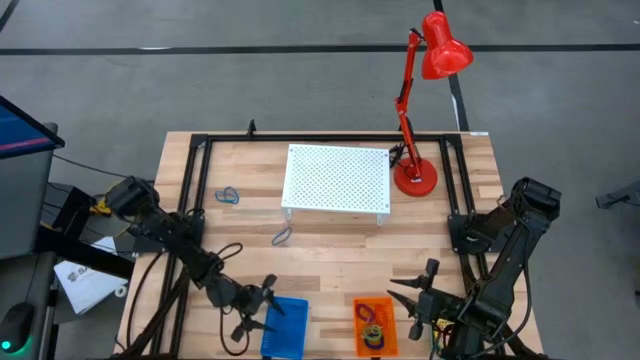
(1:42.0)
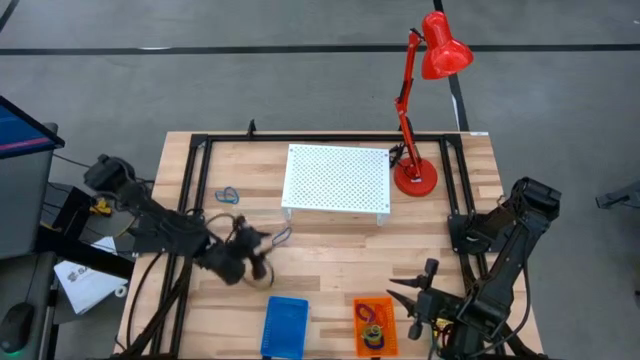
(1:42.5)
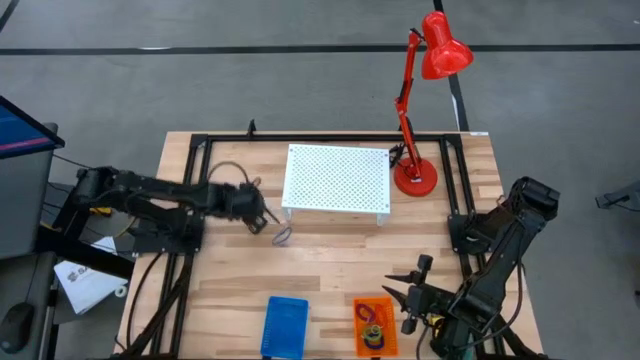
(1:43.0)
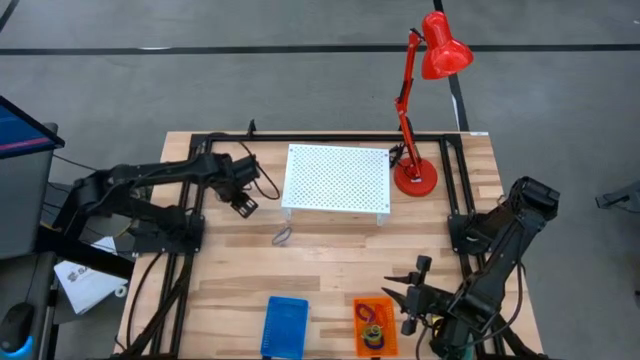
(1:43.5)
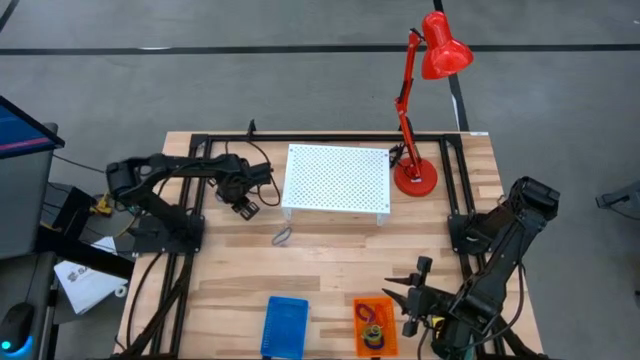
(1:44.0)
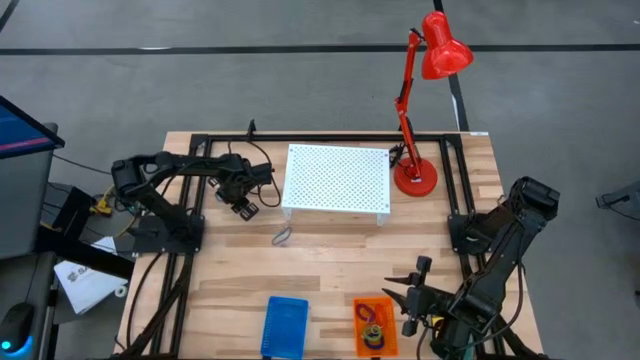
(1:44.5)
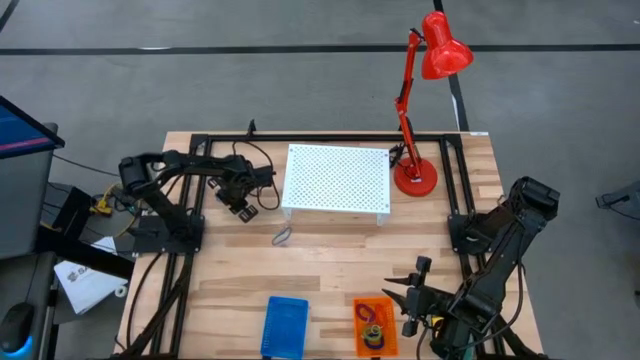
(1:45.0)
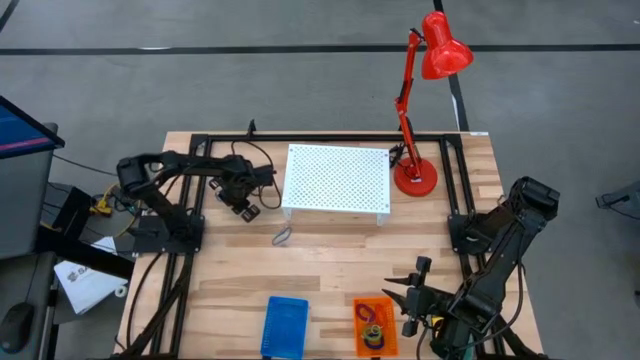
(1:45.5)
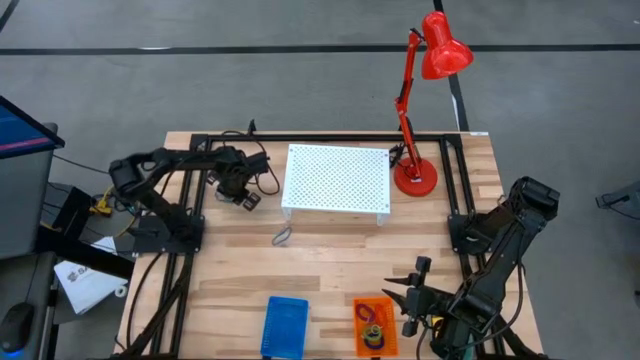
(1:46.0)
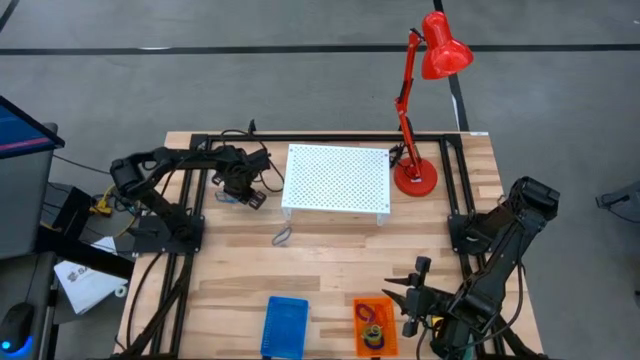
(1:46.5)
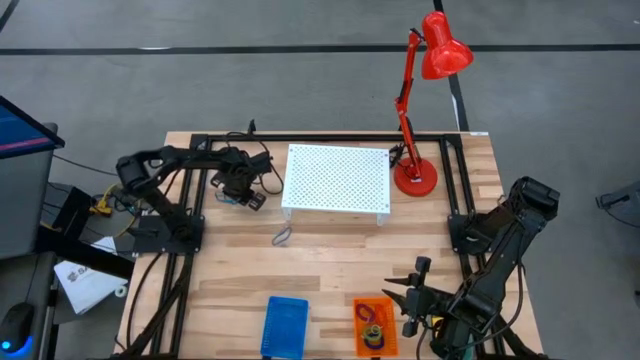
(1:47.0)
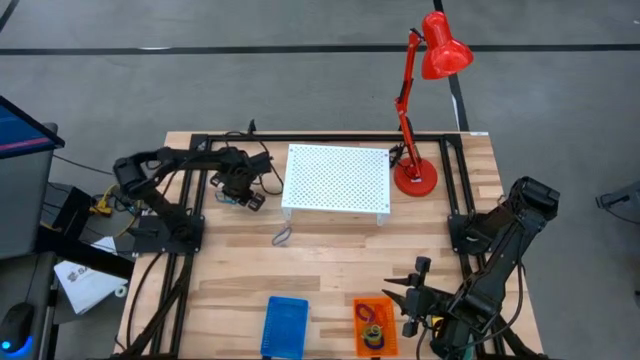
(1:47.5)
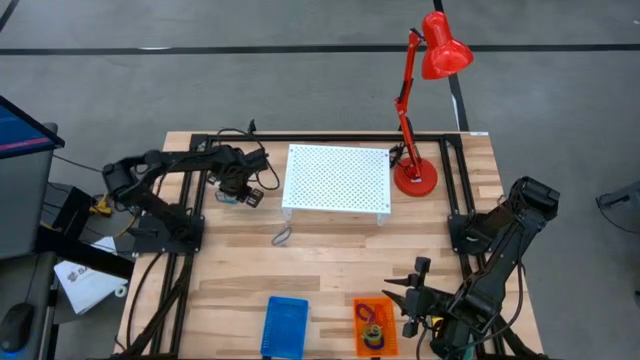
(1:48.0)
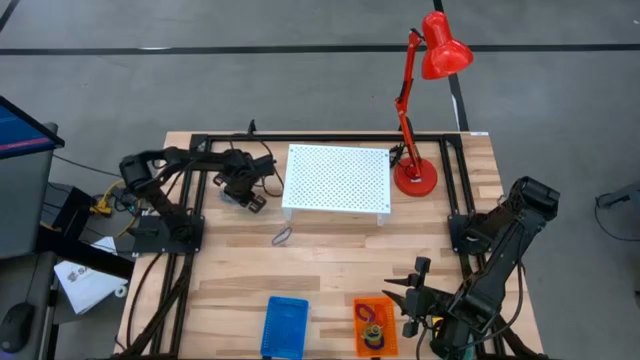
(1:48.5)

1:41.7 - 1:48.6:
Task: Pick & Place Office Desk Supplies
Put the blue rubber band into the blue bin

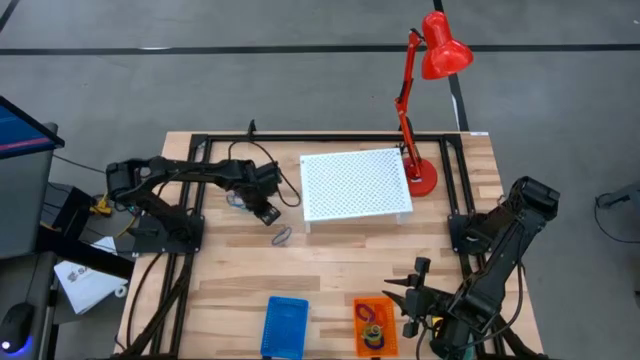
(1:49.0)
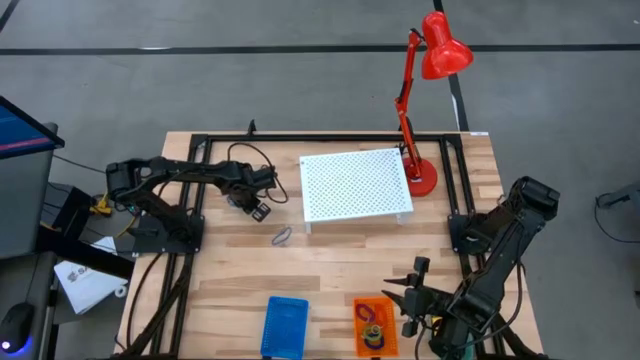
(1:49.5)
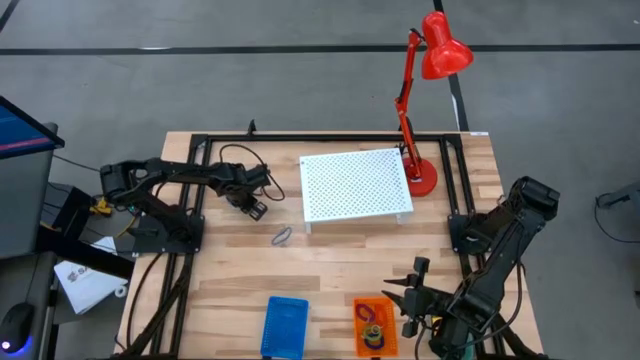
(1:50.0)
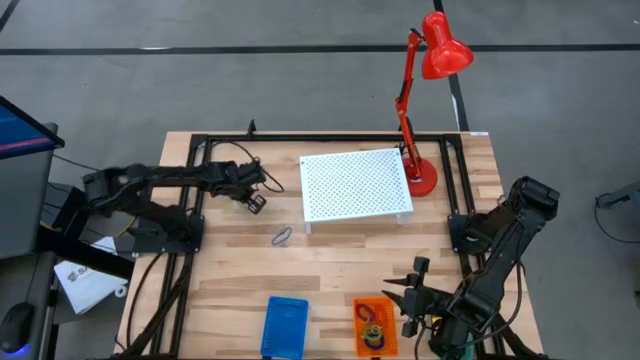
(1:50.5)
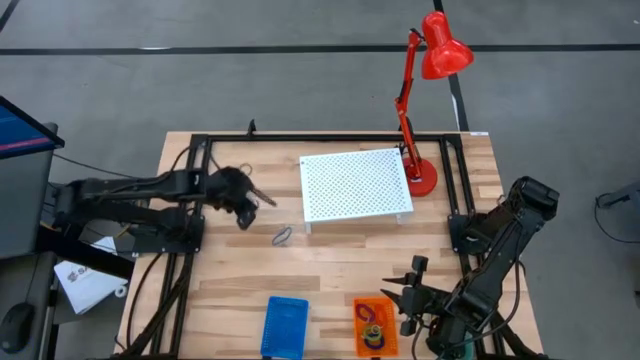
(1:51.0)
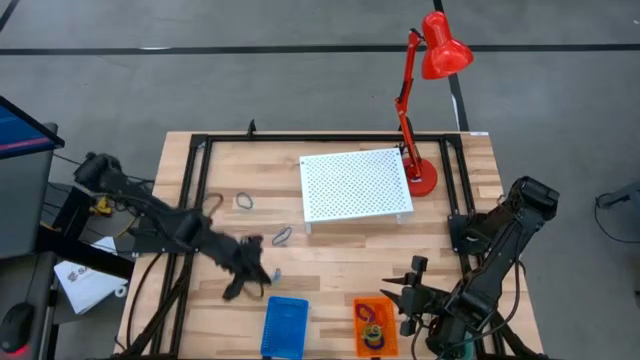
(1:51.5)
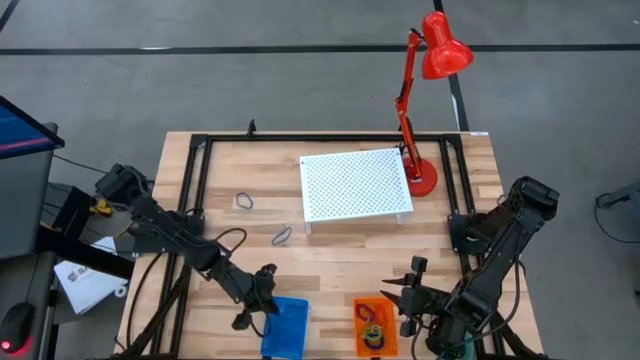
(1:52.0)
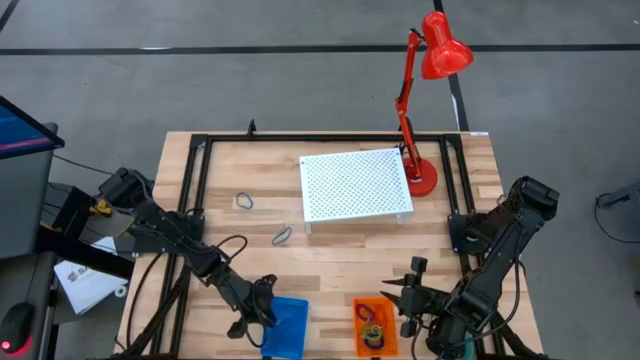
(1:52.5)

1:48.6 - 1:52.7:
Put the blue rubber band into the blue bin

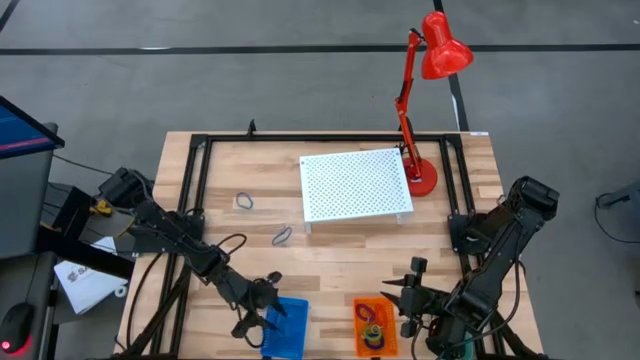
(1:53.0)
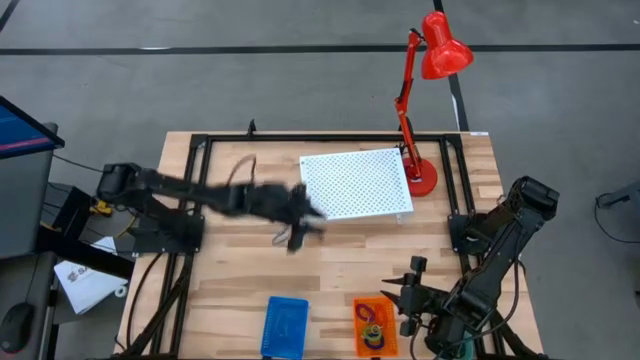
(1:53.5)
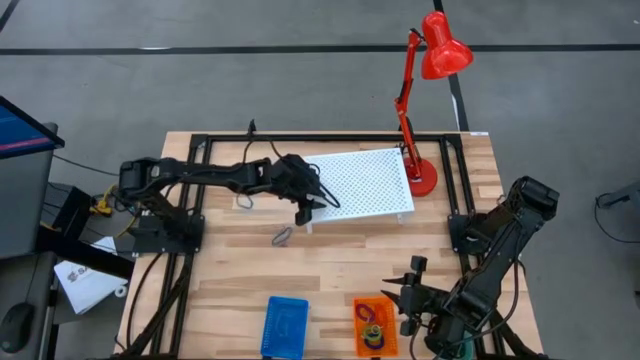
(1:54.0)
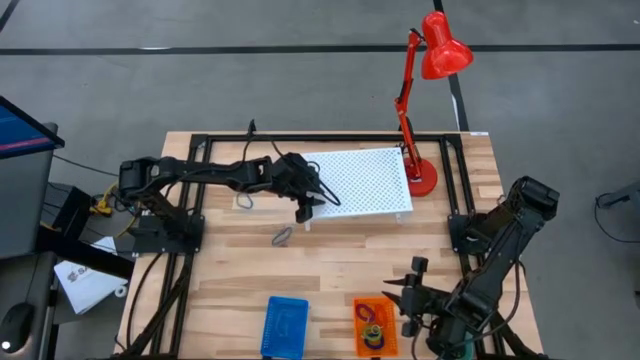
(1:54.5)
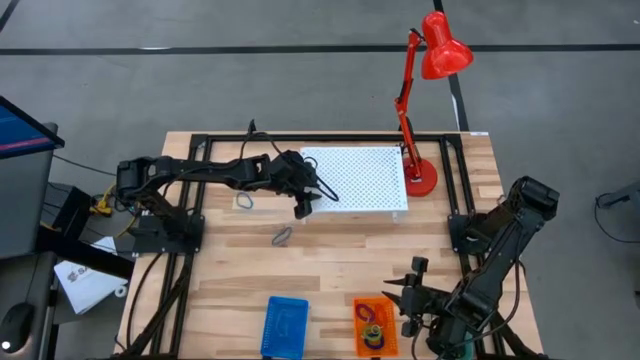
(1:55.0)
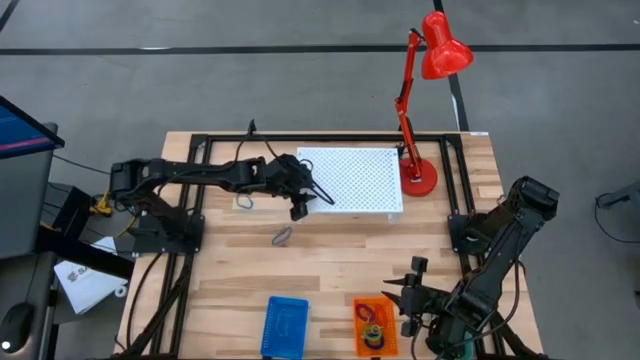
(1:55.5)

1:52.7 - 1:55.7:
Adjust the shelf

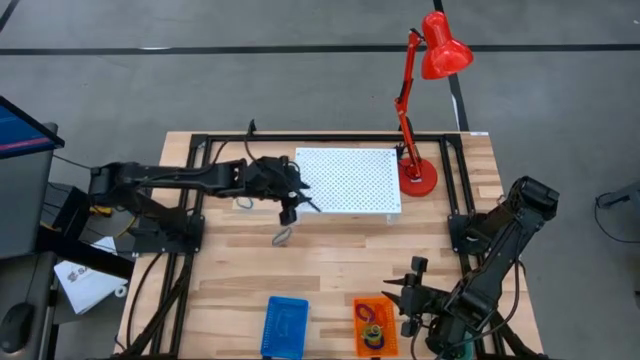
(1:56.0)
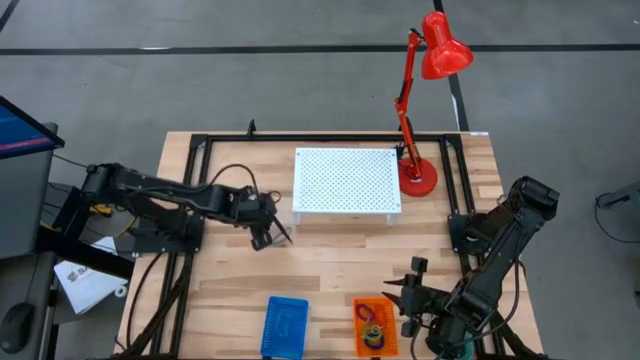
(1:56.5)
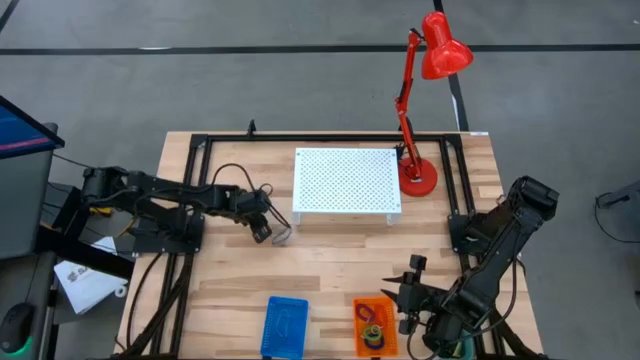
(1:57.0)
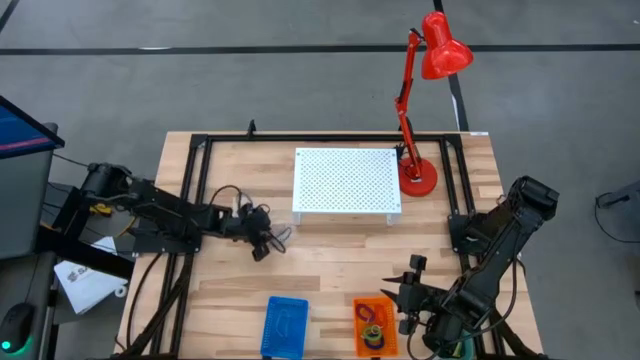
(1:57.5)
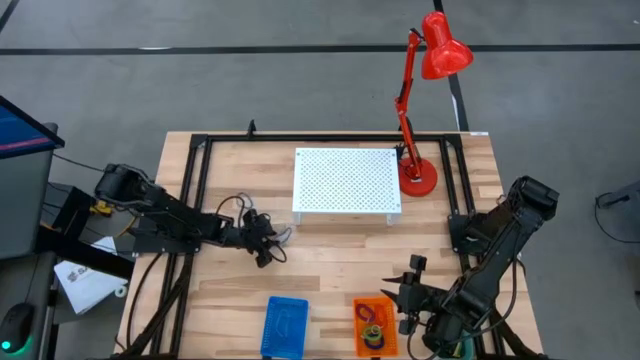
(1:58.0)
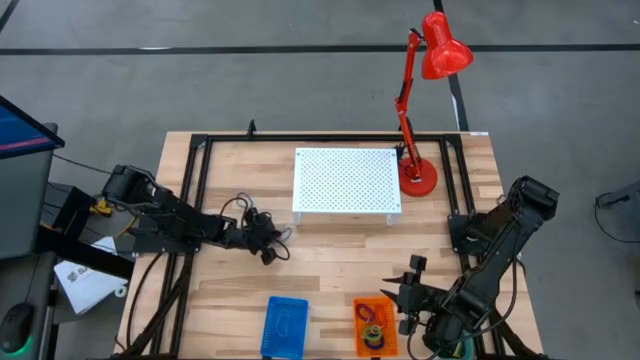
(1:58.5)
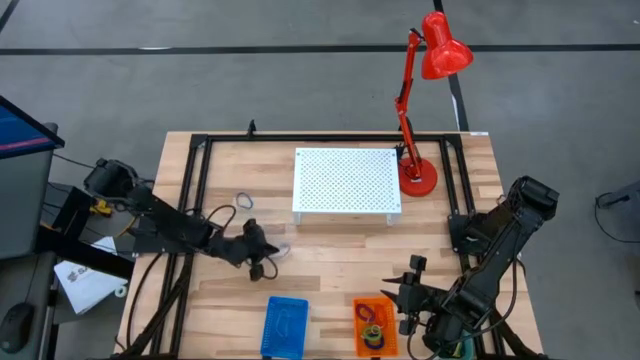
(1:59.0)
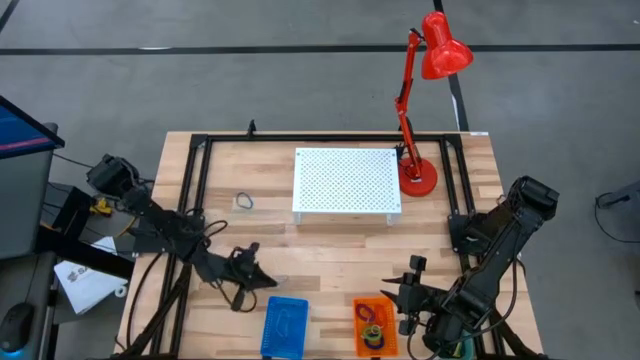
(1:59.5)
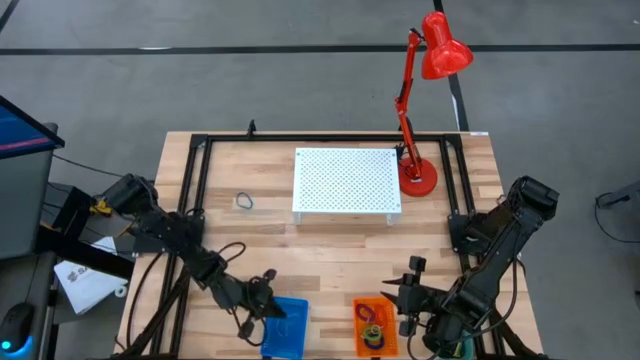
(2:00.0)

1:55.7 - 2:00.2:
Put the blue rubber band into the blue bin

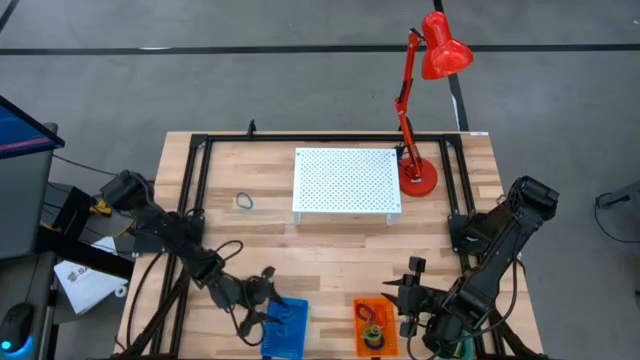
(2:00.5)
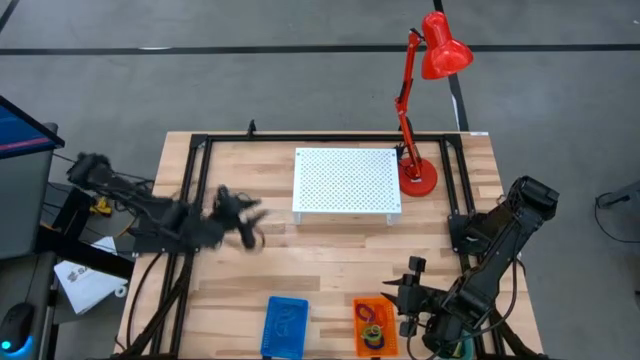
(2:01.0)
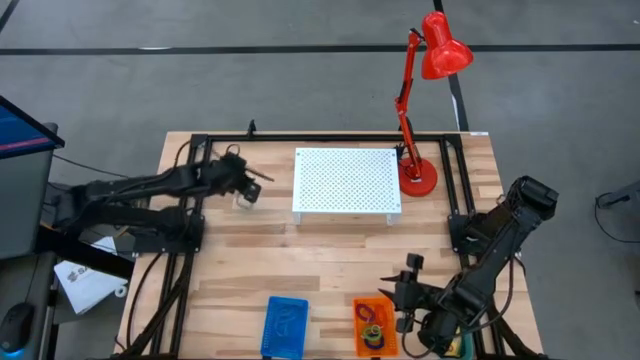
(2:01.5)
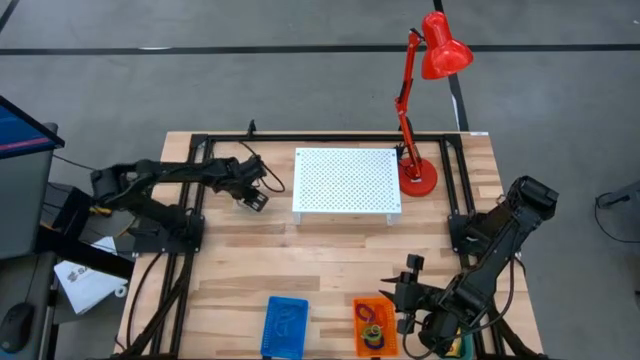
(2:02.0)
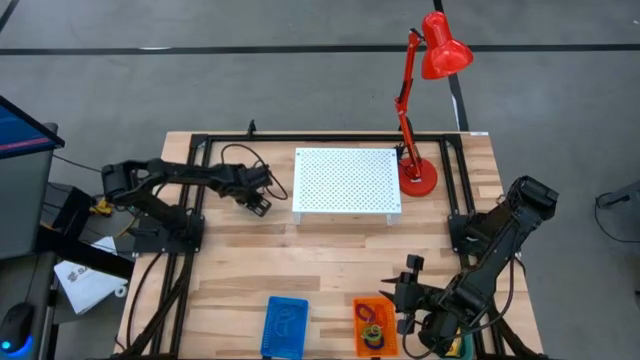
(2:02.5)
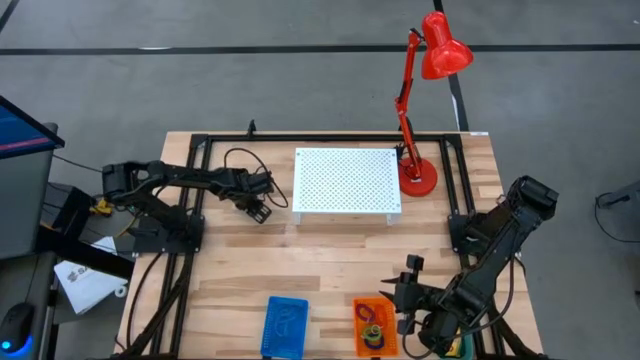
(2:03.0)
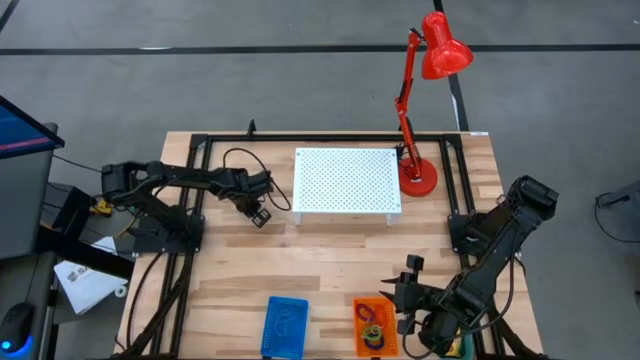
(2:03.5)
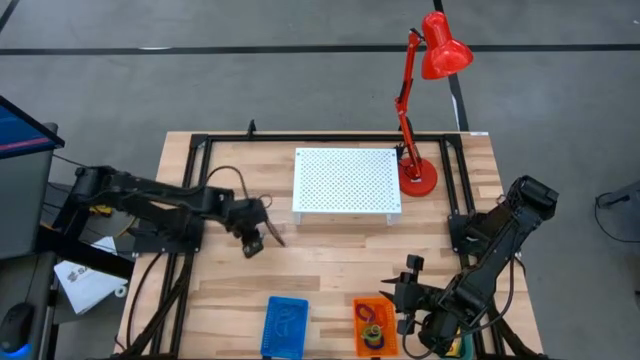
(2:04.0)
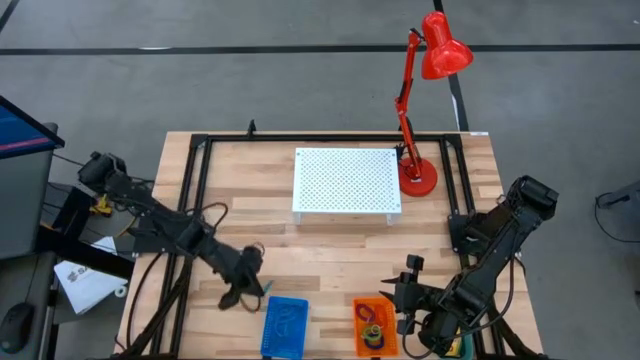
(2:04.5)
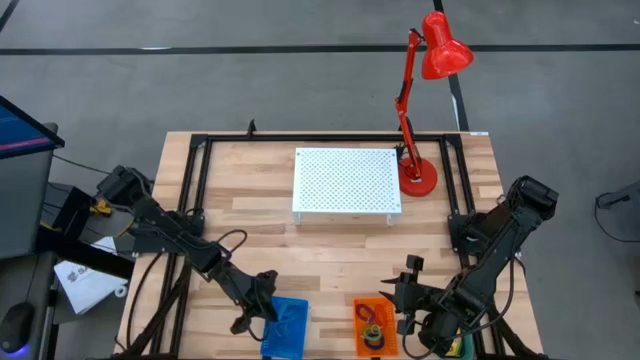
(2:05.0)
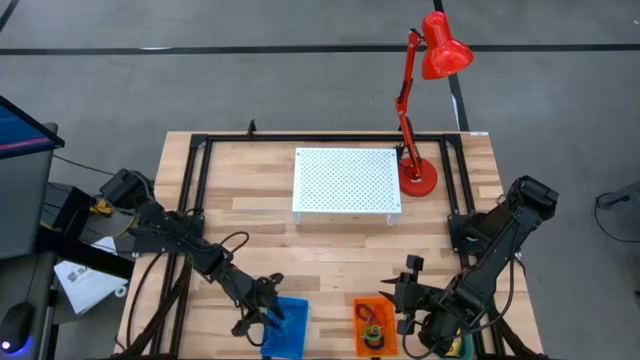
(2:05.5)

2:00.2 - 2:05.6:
Put the blue rubber band into the blue bin
